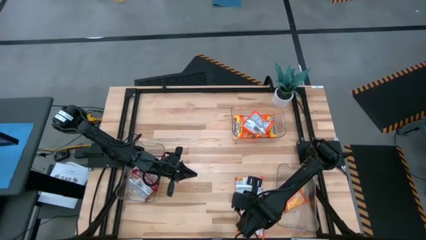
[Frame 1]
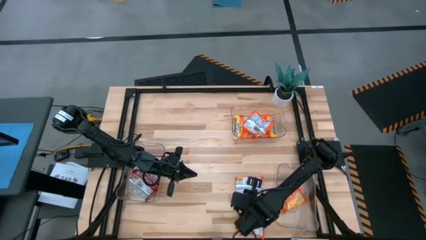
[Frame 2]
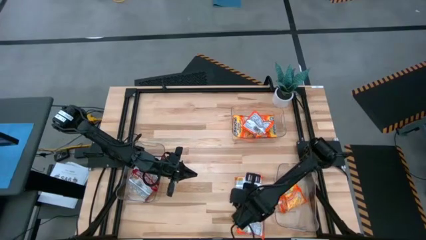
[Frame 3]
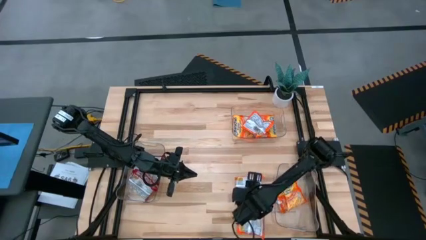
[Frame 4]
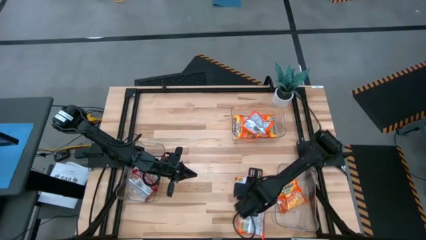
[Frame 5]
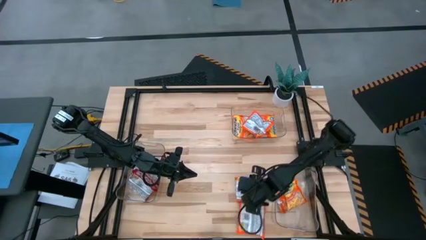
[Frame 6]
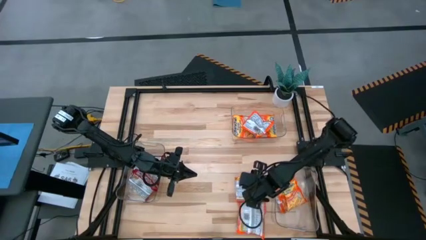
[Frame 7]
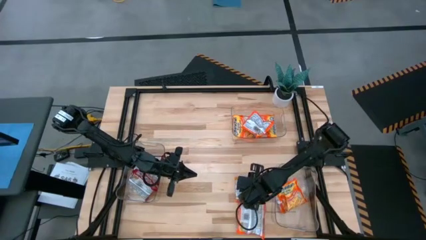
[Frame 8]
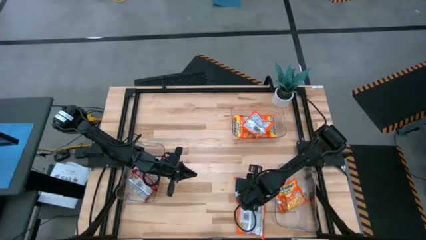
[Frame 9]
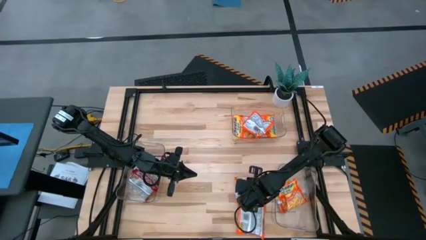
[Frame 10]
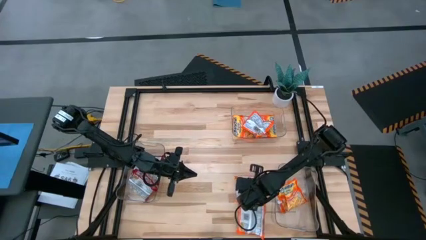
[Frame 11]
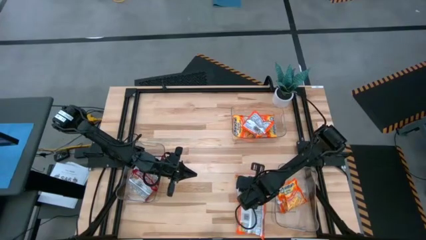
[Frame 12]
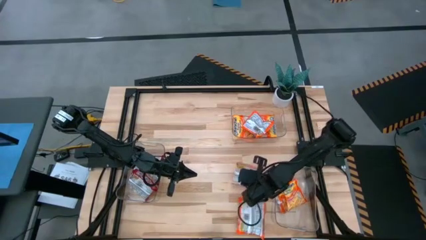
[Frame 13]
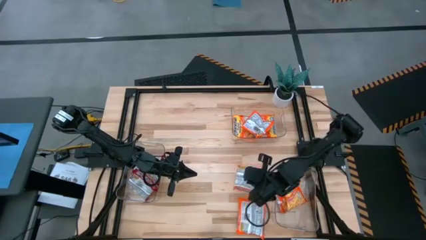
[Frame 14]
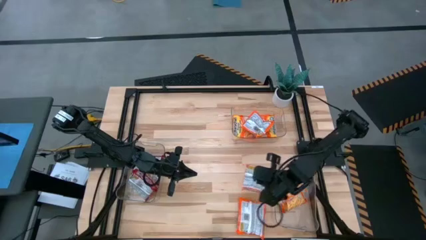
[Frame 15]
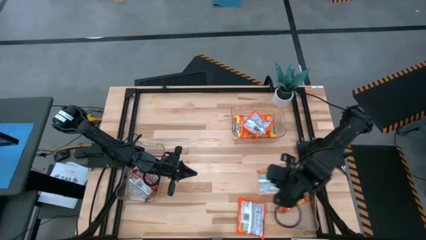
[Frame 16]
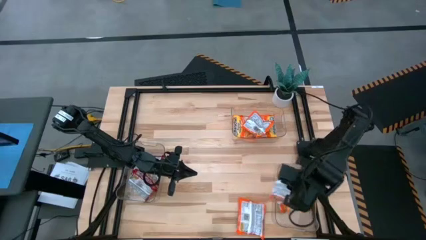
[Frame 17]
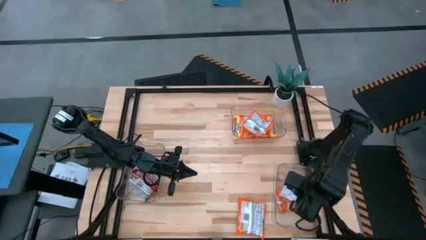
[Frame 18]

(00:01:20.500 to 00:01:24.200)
Task: Sort Maruchan noodles
Put the orange noodle pack into the bottom right transparent bin

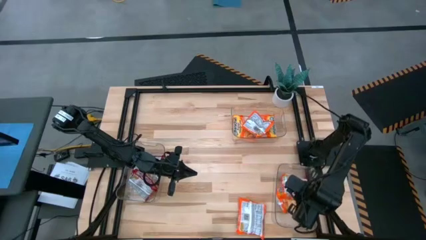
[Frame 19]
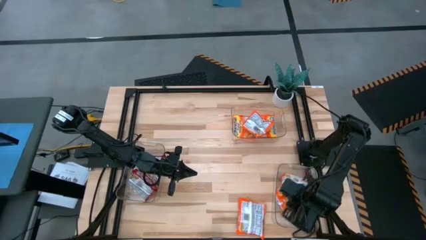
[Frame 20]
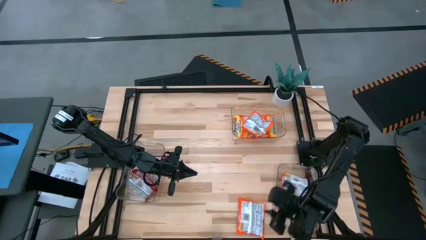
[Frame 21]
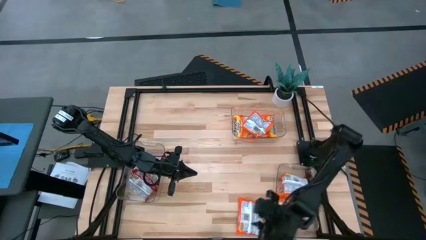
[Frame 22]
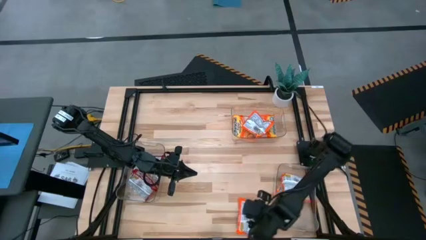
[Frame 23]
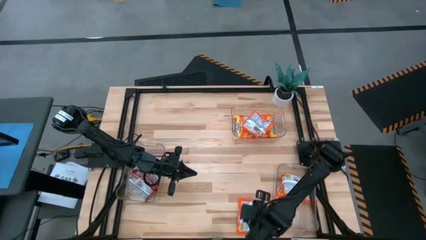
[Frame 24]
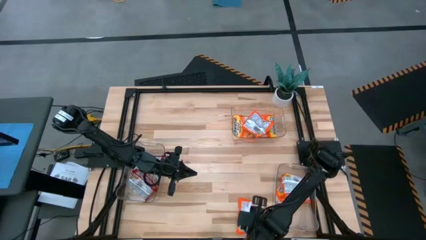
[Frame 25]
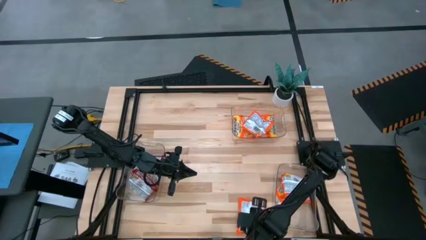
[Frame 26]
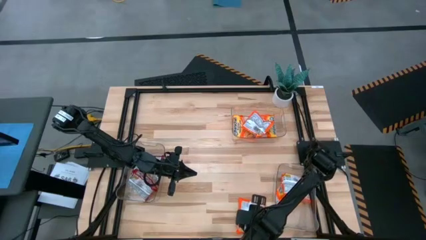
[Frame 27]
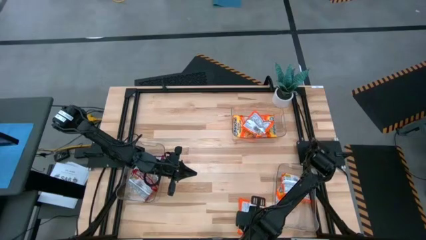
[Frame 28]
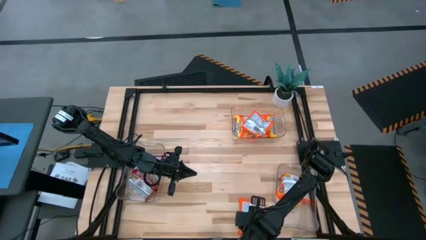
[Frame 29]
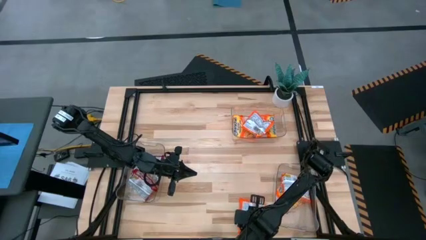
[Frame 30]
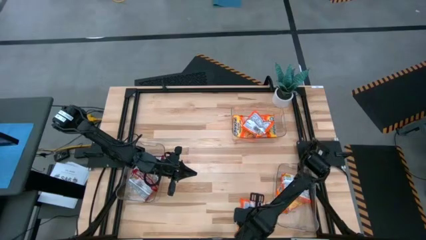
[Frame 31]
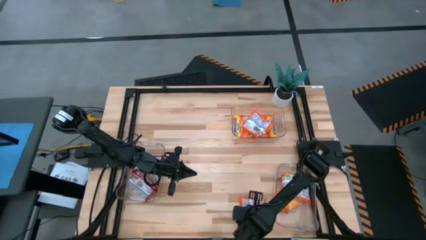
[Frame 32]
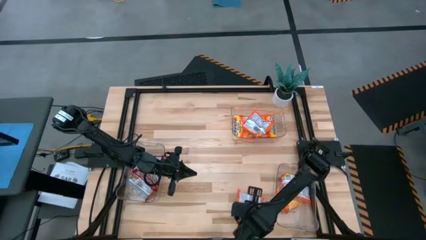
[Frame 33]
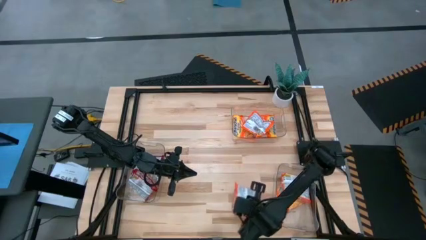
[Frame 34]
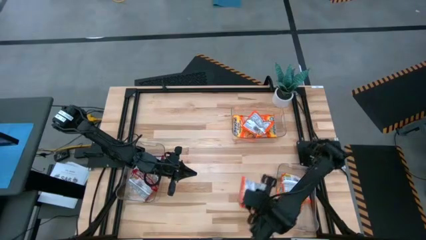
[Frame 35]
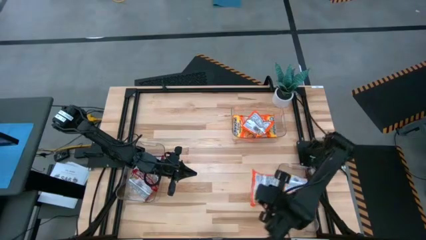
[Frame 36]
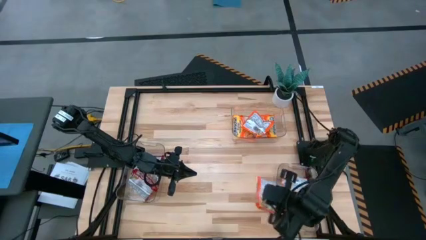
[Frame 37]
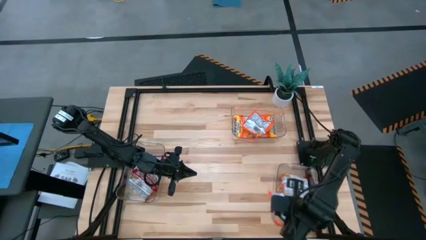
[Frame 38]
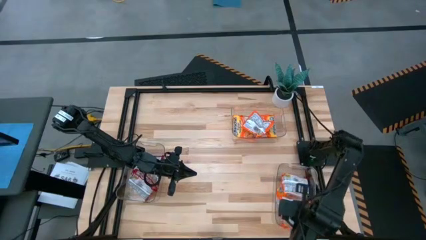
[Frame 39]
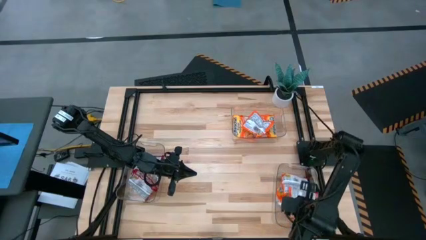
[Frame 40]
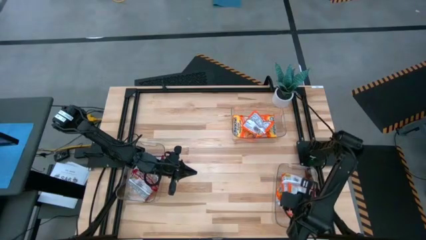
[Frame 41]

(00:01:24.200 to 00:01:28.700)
Put the orange noodle pack into the bottom right transparent bin

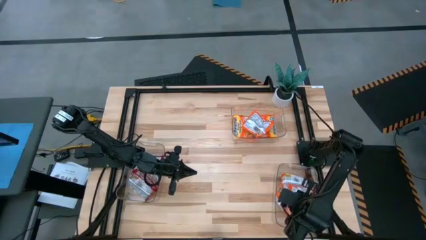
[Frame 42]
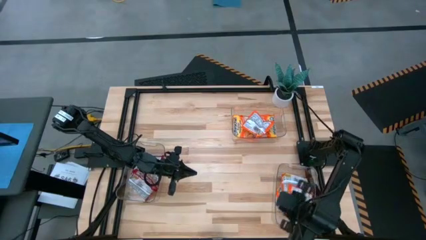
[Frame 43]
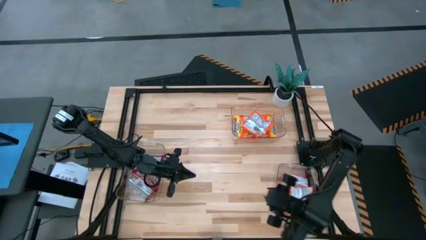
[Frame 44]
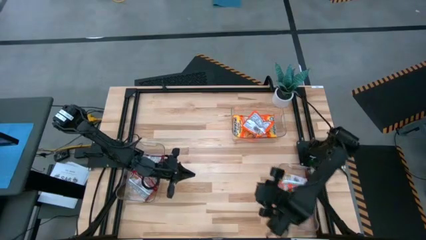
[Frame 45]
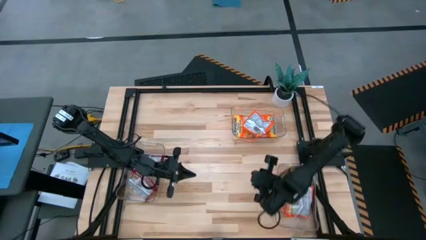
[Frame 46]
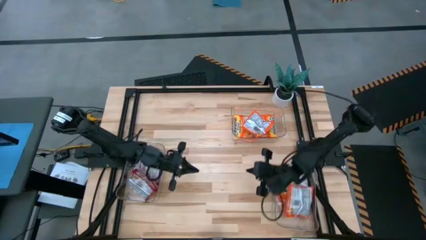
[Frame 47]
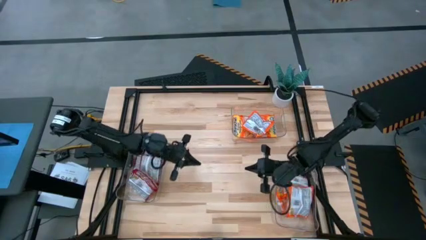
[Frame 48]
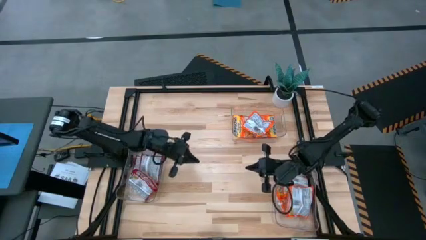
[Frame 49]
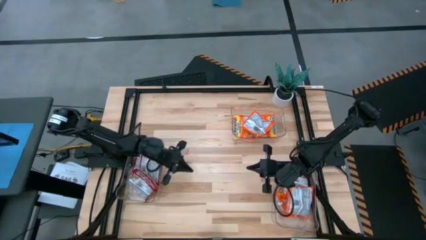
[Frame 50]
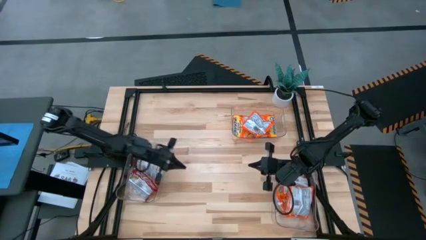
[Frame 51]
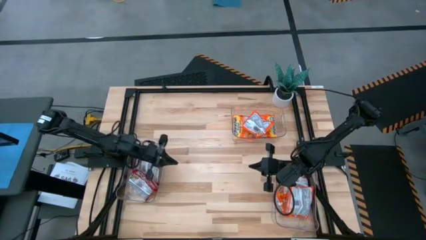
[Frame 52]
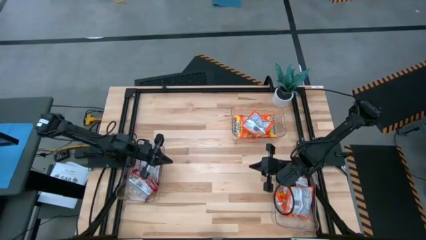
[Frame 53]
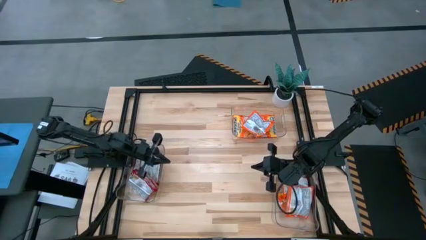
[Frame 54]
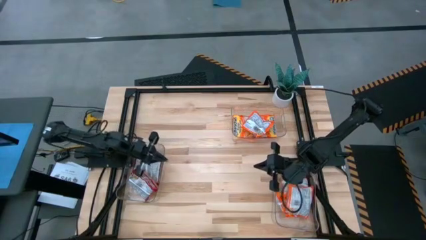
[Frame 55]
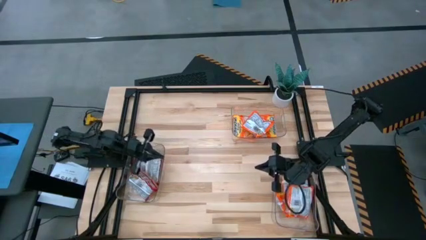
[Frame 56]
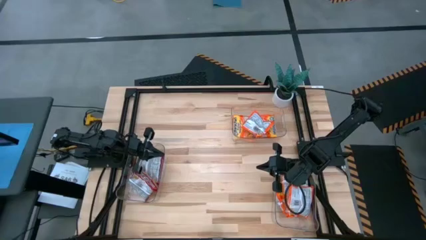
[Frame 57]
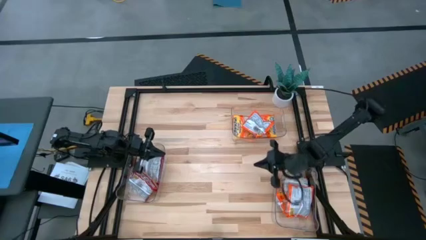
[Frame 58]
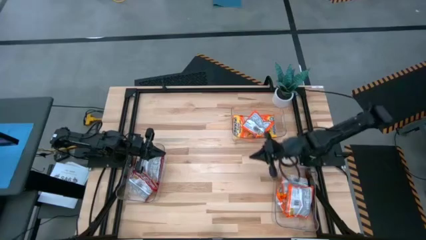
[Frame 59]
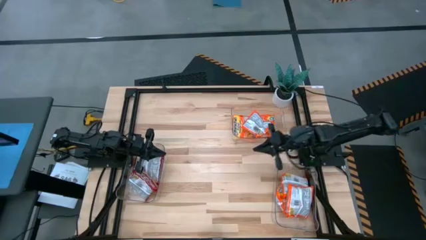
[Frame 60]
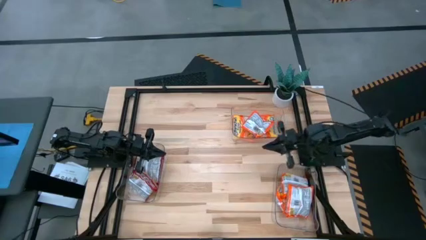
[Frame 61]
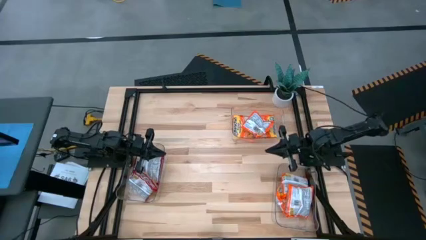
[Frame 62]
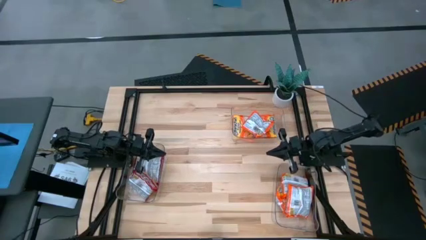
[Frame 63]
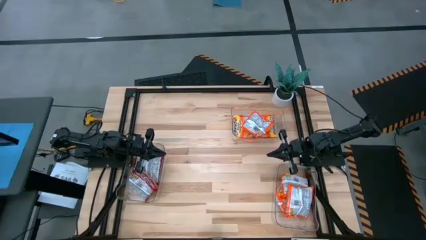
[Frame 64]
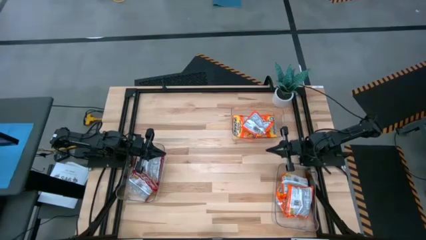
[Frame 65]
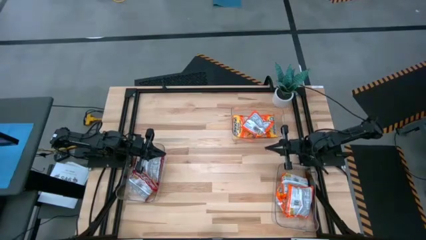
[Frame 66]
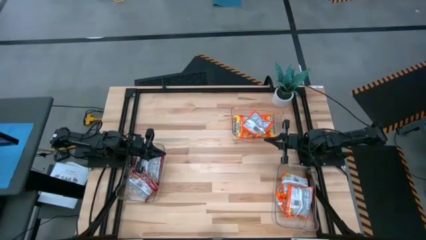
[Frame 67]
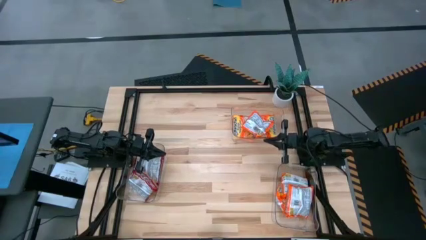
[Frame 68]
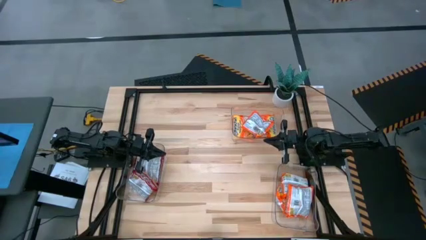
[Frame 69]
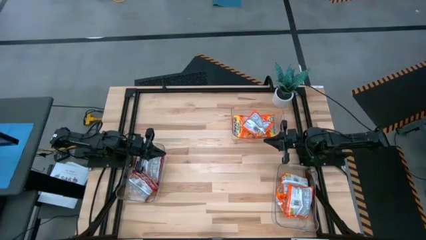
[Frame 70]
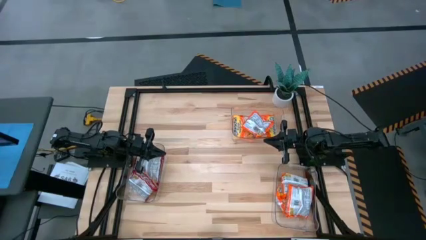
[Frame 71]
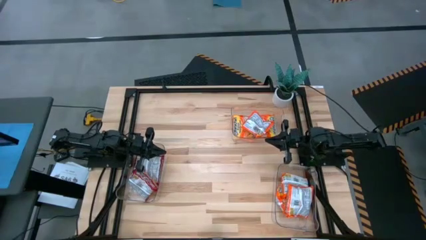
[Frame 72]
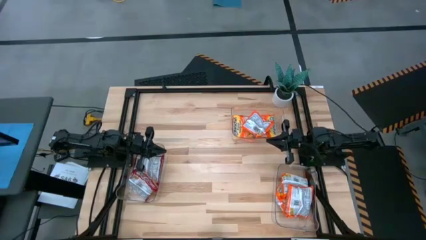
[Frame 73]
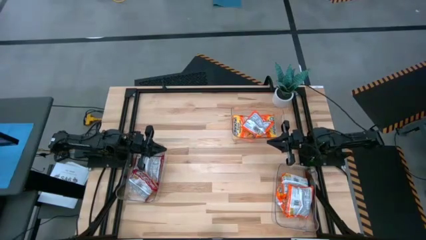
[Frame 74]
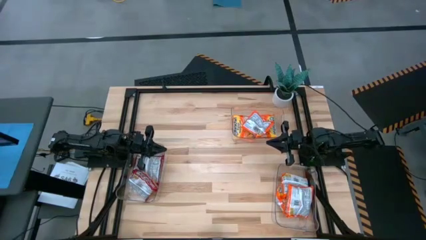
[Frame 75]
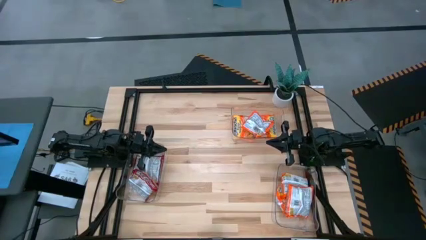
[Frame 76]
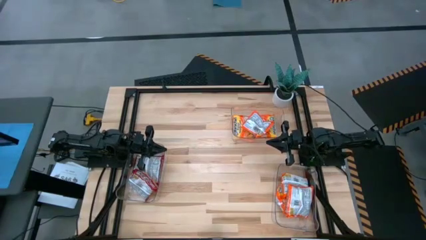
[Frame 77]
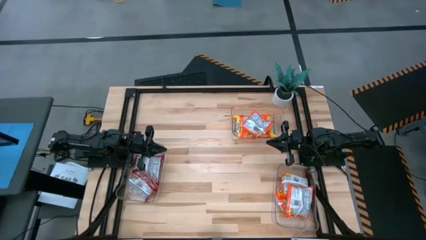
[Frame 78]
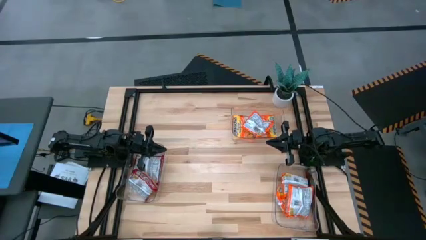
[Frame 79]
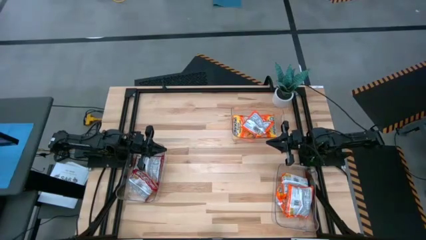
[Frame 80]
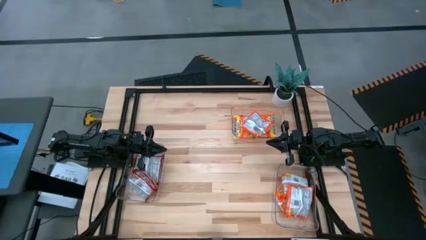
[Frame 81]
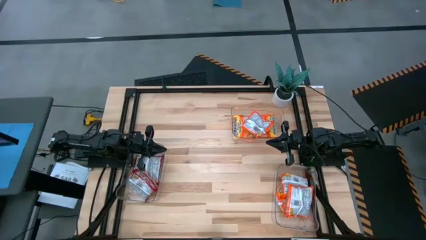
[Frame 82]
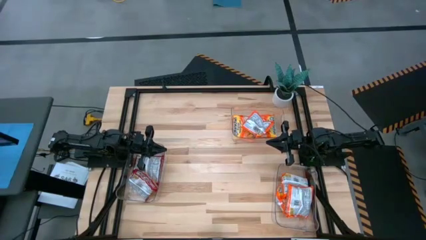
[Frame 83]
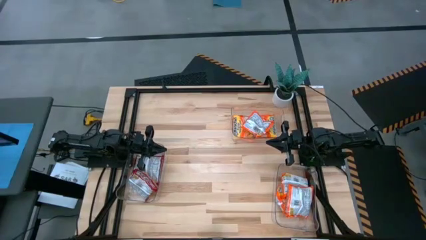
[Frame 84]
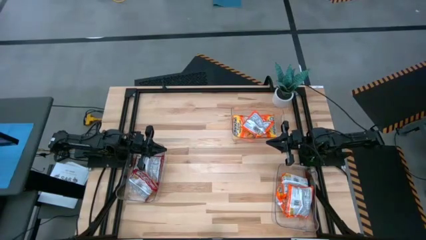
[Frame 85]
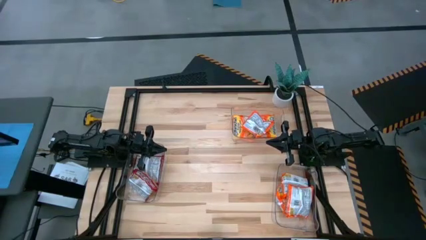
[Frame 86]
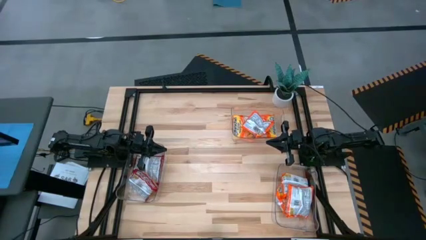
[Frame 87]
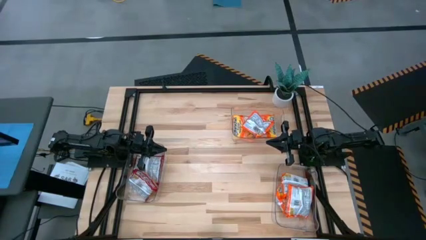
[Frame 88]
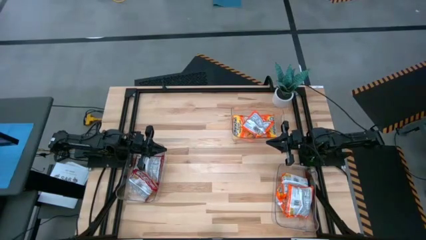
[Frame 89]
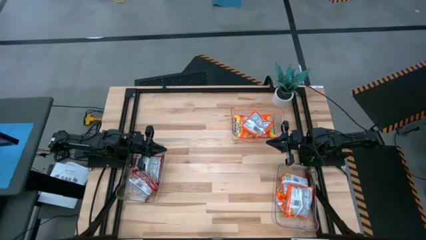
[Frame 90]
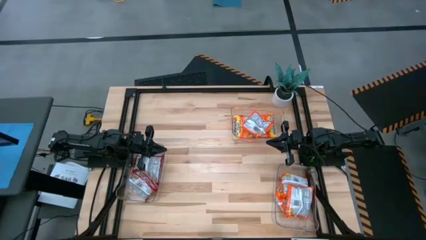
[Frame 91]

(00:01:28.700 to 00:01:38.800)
Return to Home Position
